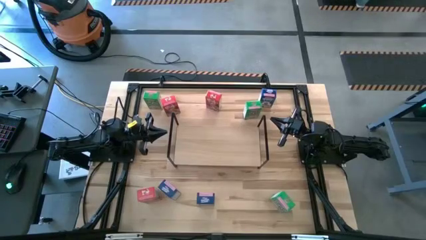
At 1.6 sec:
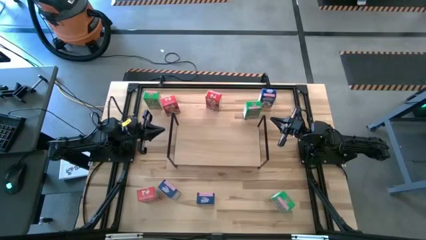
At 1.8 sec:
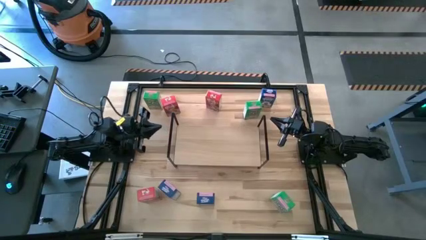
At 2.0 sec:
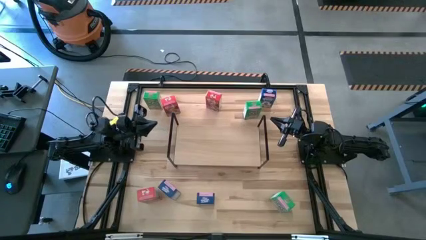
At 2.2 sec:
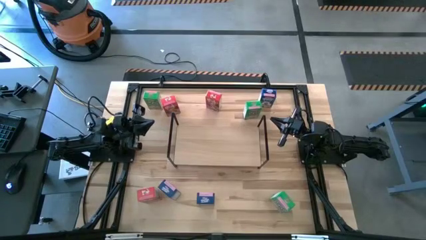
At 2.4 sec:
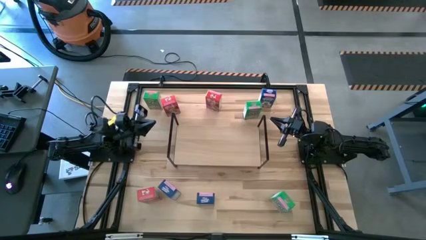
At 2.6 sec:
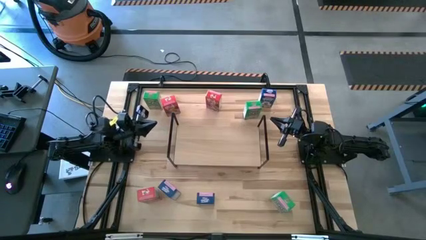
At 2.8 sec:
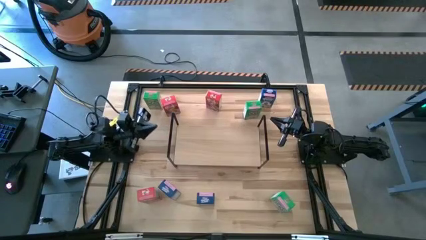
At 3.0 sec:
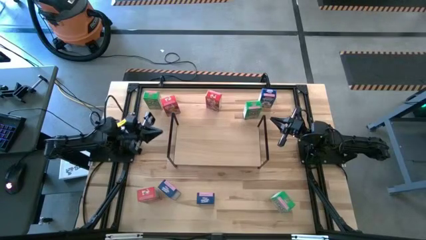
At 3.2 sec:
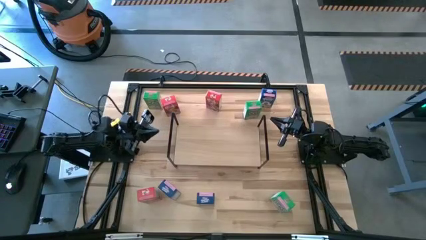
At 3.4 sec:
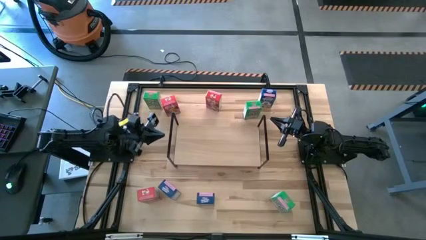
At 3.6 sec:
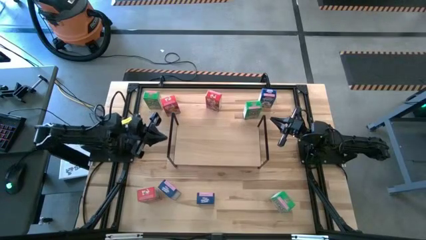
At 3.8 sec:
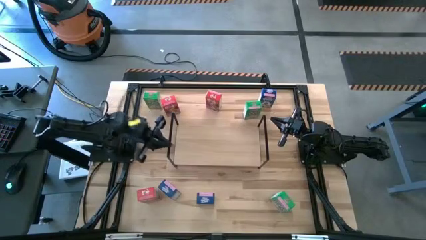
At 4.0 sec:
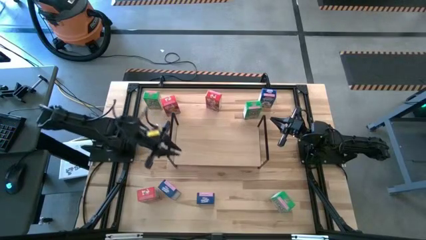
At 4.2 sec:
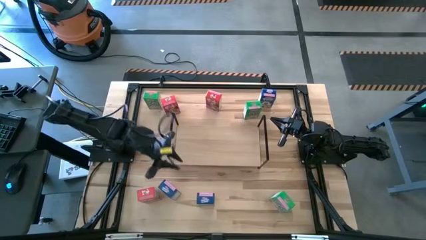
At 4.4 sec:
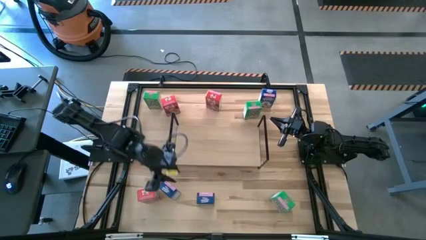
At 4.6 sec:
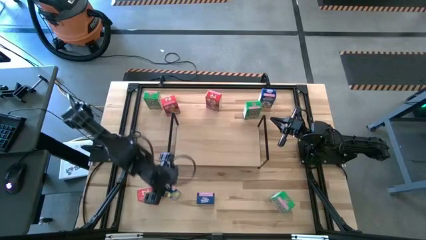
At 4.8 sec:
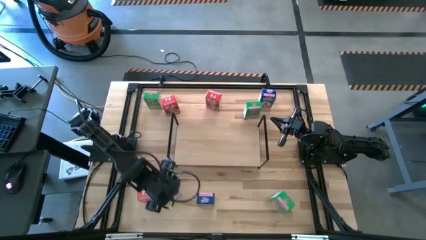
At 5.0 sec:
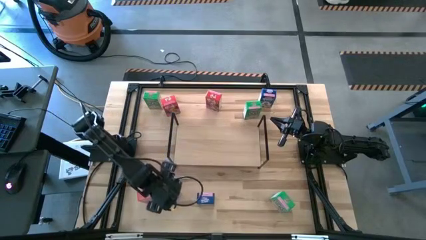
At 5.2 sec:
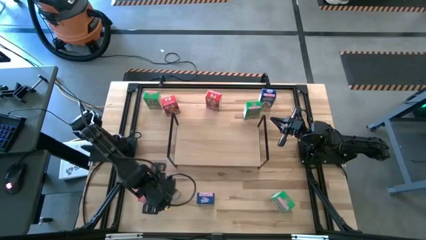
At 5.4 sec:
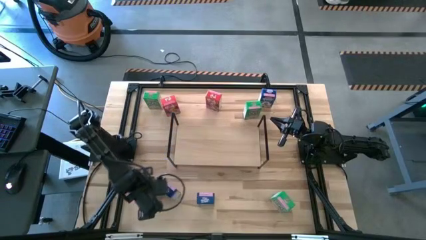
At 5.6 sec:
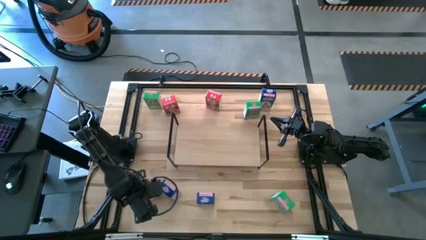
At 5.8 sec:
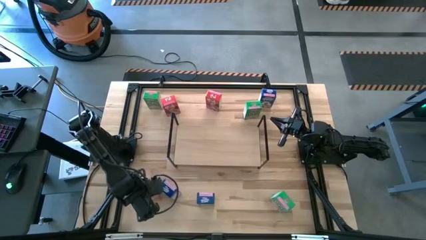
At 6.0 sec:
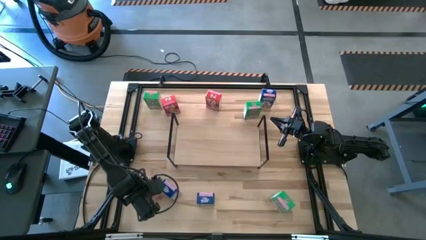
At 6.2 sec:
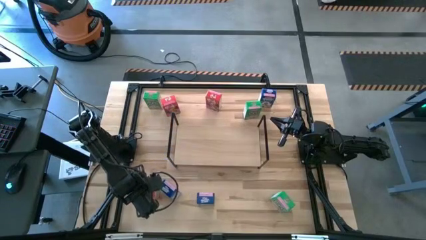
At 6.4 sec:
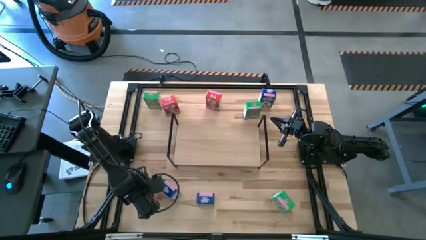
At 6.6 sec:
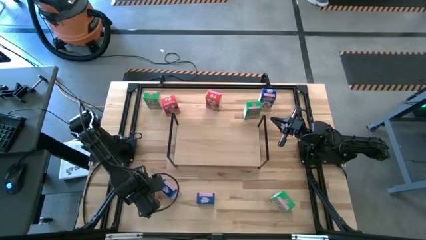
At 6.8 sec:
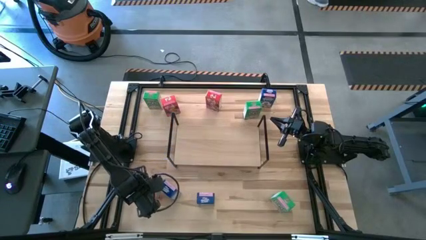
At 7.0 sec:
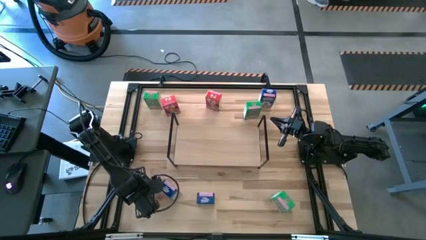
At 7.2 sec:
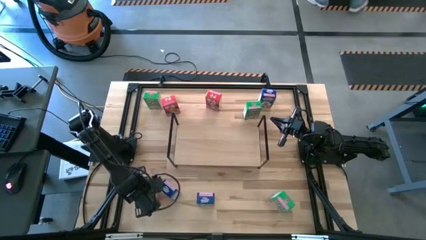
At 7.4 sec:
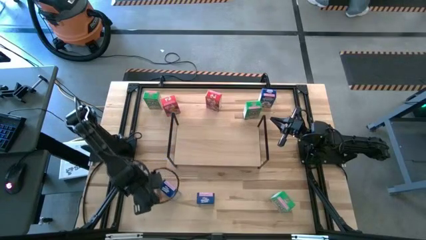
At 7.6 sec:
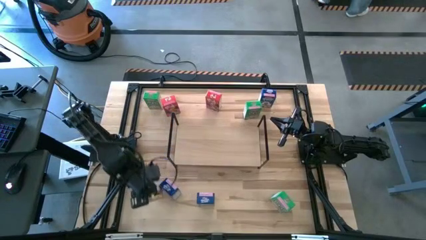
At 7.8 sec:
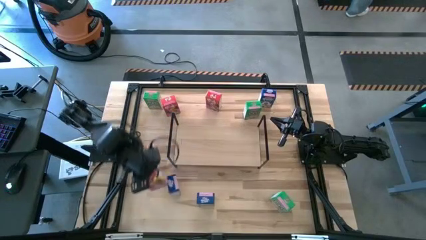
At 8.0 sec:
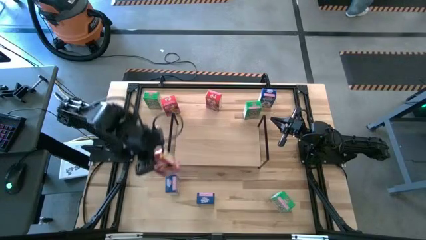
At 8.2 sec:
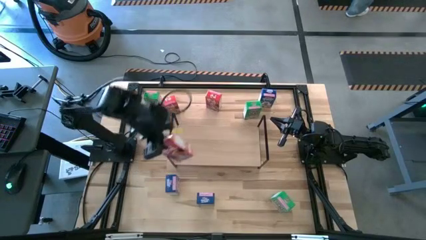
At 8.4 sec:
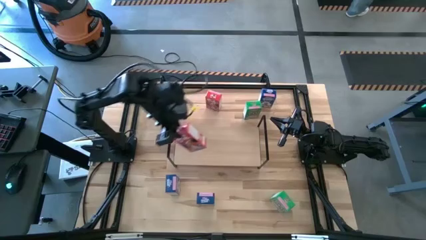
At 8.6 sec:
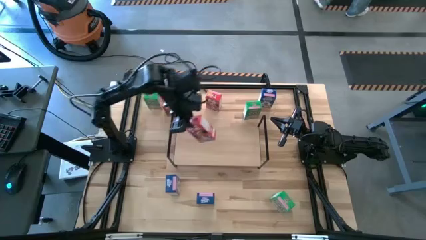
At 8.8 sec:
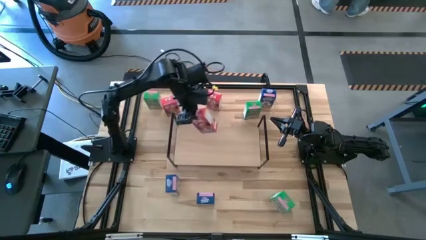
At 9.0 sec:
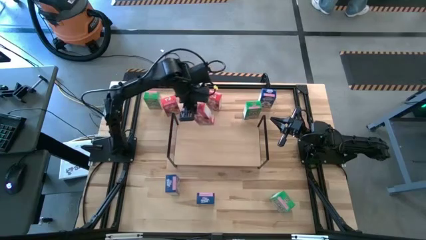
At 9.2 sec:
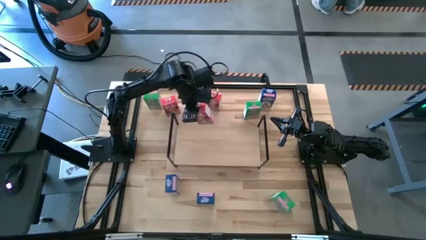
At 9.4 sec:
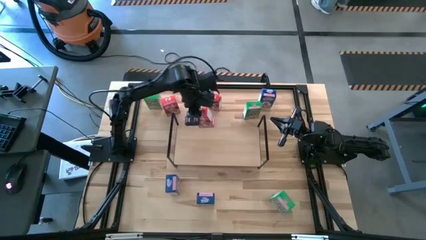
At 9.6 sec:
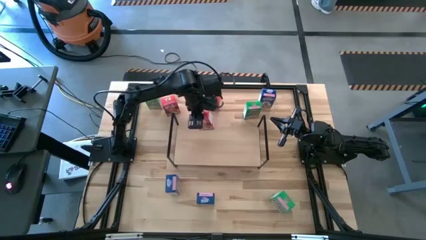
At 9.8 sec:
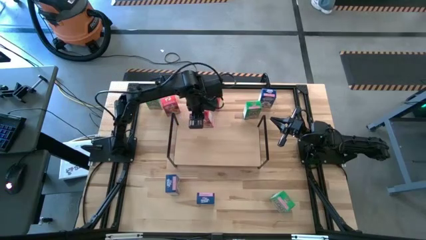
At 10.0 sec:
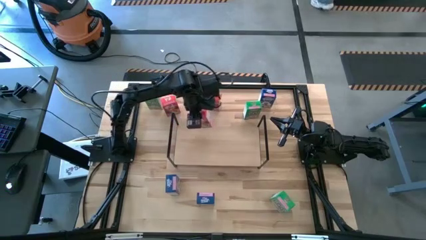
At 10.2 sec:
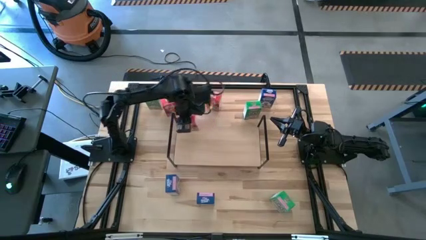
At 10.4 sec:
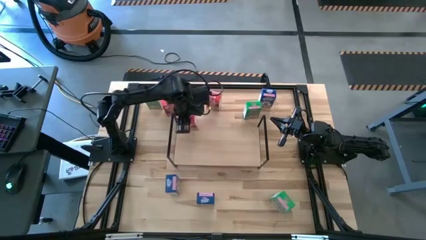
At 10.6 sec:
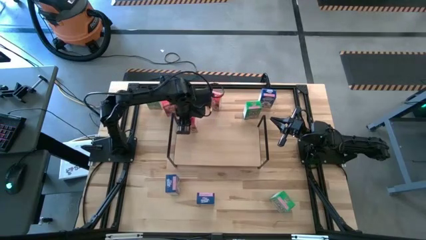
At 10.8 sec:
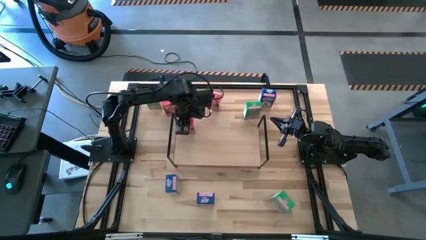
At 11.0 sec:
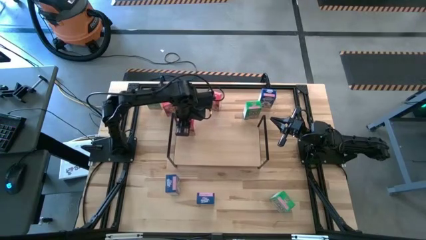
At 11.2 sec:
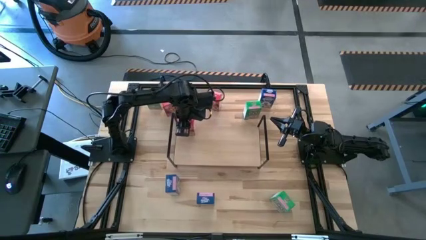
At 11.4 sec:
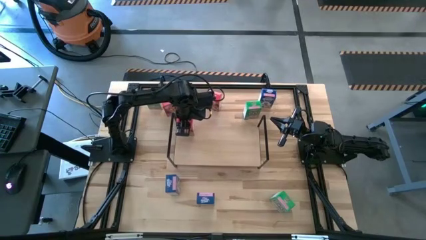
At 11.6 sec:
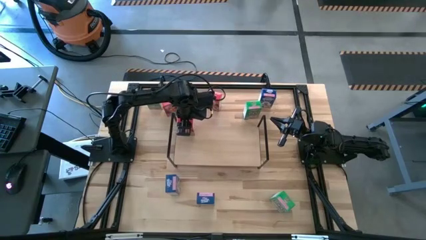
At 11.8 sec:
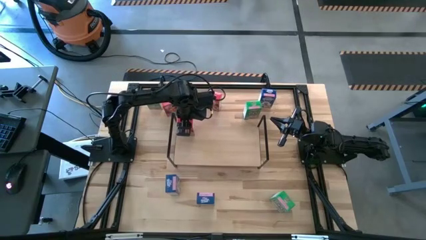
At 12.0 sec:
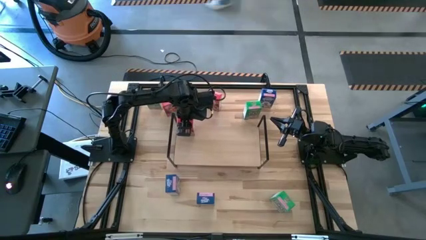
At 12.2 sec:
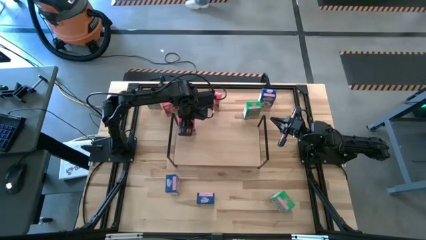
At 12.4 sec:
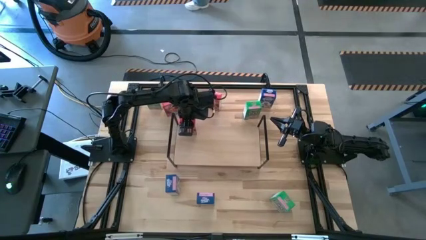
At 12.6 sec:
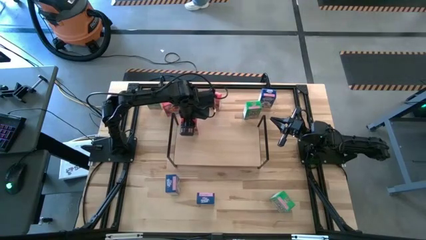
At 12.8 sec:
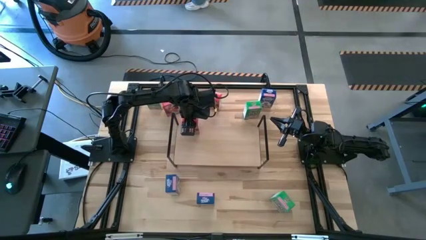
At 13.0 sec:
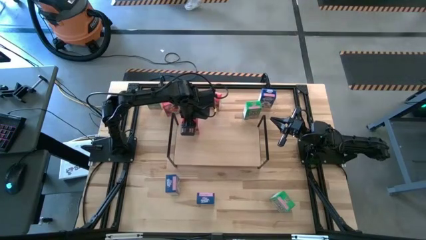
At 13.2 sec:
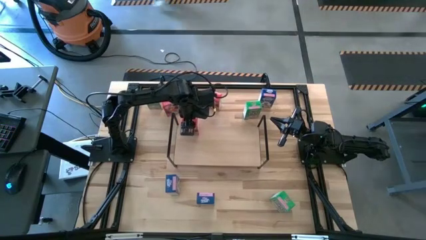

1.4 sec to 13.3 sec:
Task: Stack cereal on shelf
Put the bottom red cereal box on the shelf
